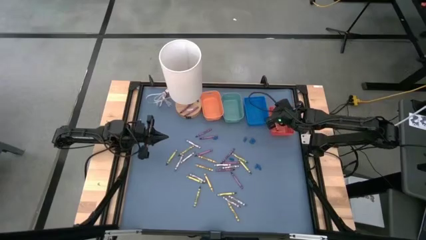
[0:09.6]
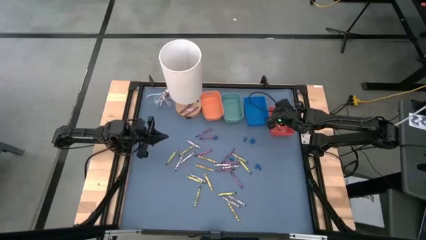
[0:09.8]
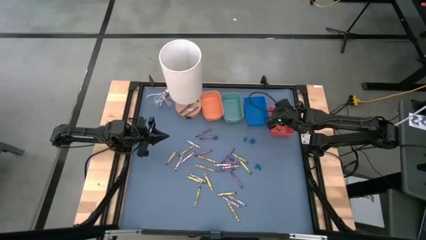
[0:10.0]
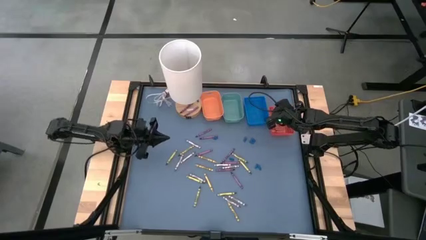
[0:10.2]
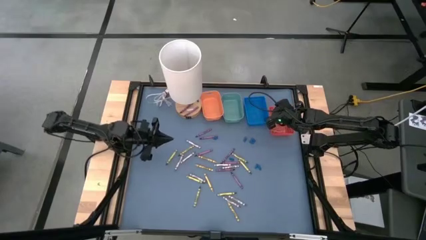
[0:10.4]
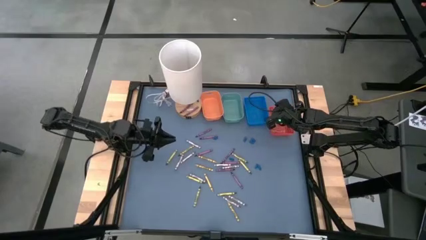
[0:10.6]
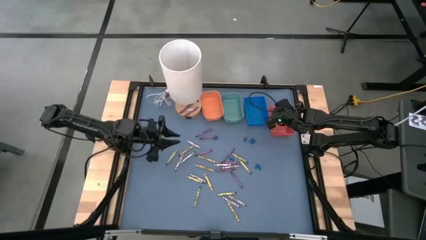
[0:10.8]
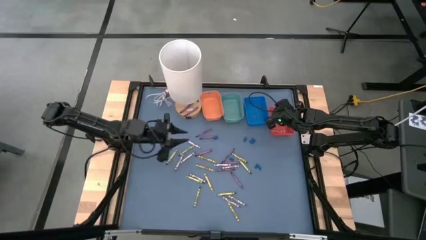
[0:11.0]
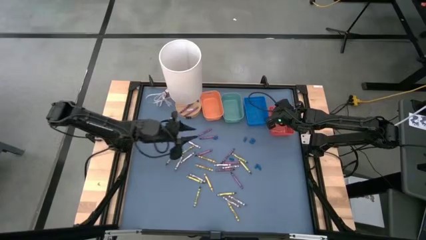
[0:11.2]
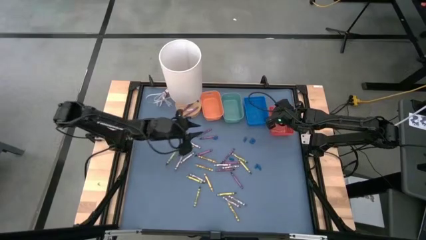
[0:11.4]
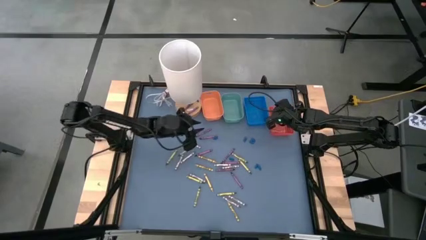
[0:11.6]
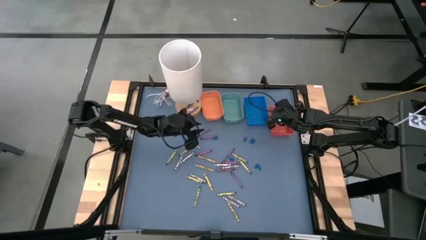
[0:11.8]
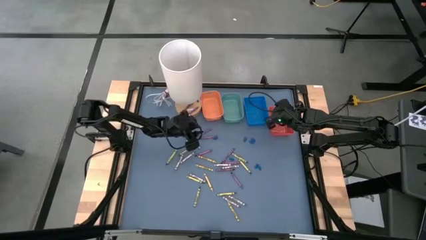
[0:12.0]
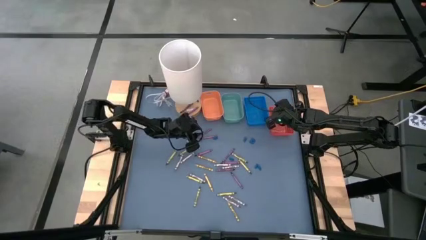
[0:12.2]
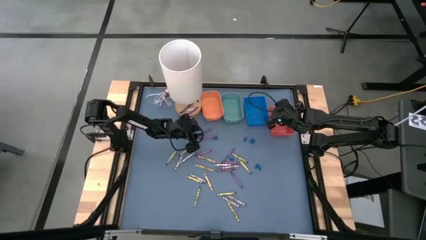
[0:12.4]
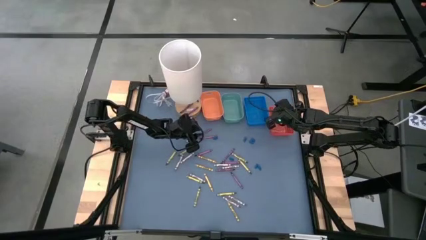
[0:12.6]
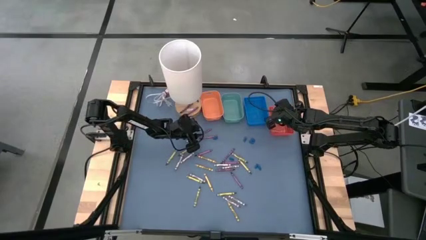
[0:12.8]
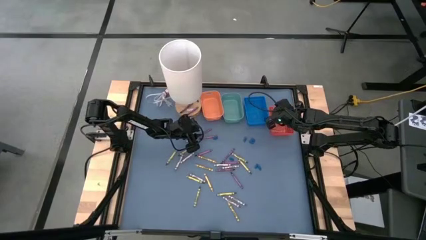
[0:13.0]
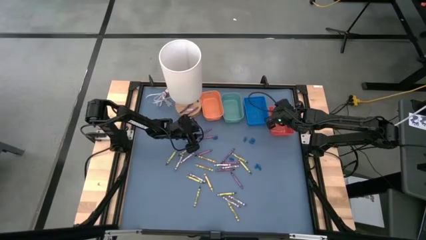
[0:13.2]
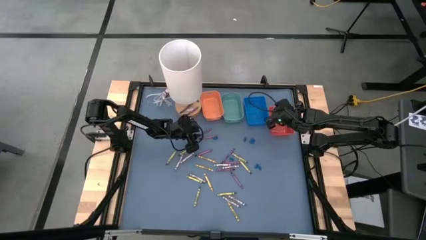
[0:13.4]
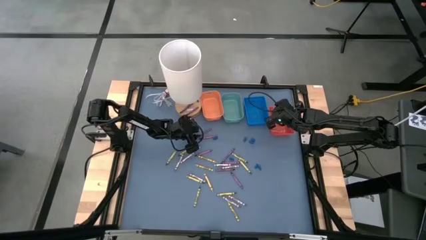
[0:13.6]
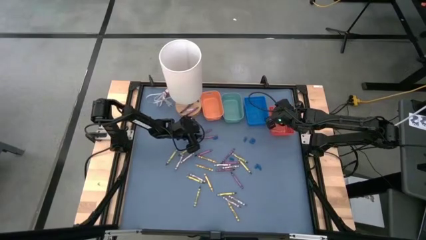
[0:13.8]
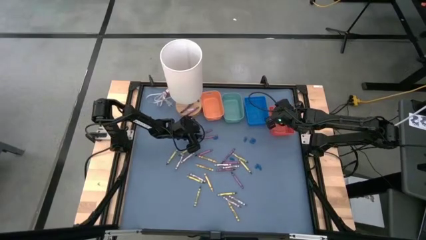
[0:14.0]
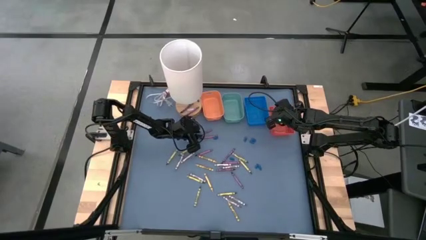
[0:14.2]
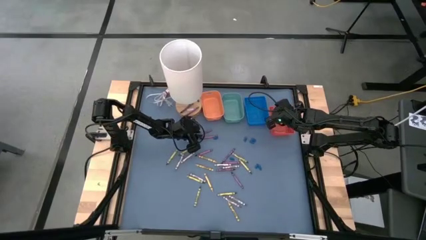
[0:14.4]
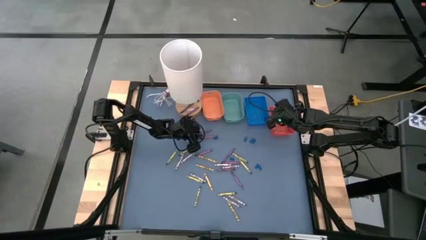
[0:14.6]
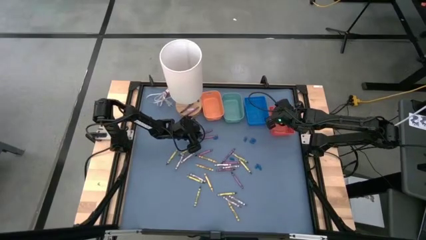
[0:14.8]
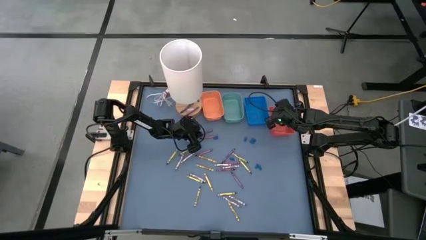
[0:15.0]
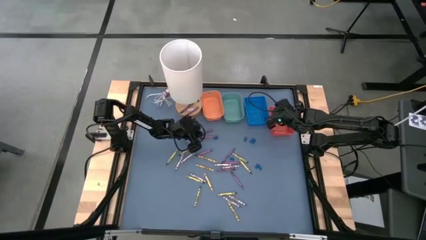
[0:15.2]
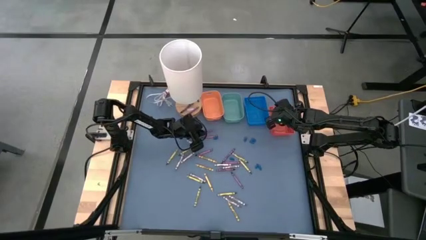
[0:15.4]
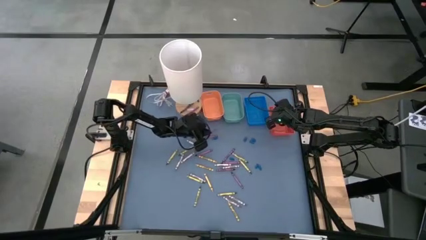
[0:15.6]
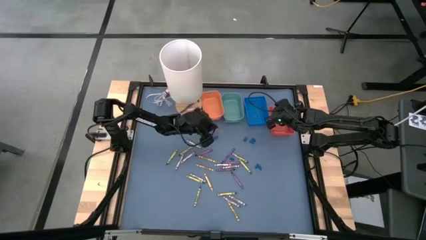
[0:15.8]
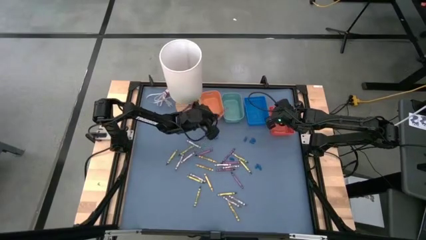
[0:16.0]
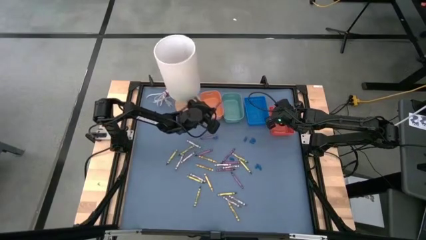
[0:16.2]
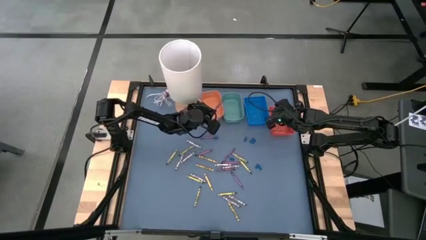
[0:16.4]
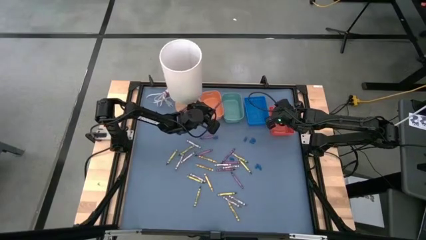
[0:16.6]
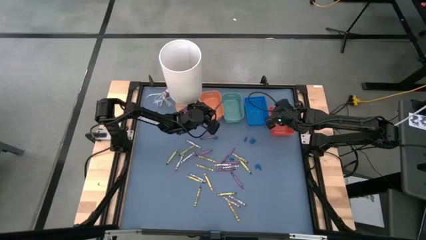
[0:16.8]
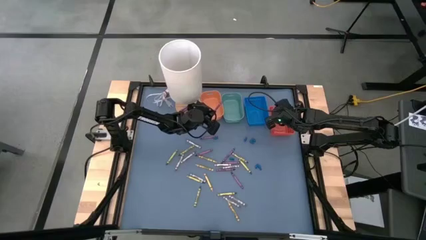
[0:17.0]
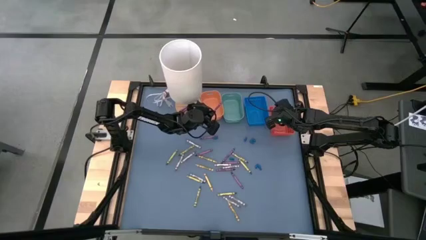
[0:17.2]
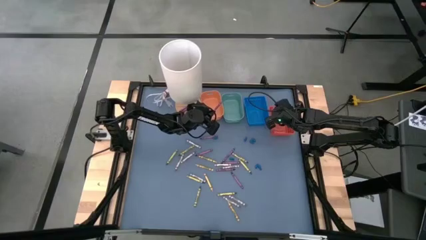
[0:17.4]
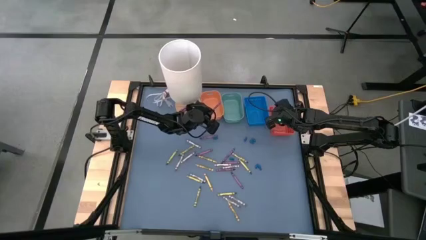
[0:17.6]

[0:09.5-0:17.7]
Task: Sort crayons
Put the purple crayon into the light orange bin

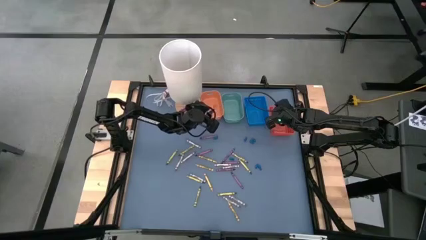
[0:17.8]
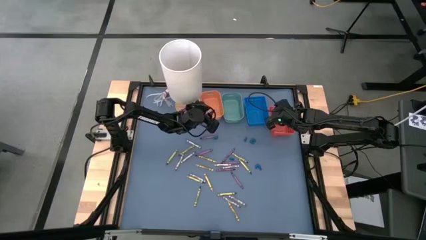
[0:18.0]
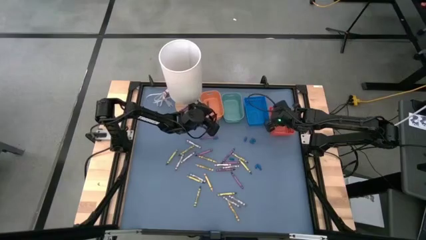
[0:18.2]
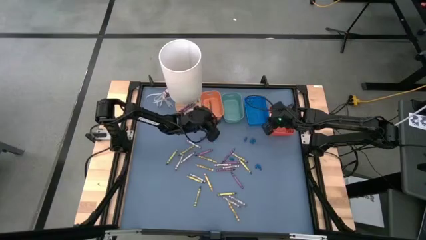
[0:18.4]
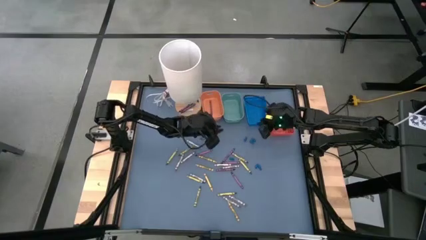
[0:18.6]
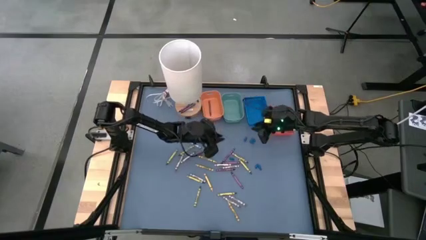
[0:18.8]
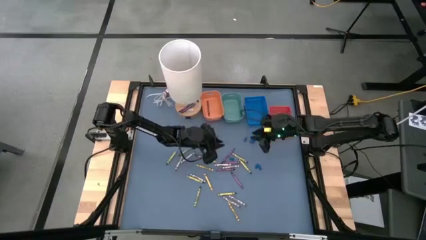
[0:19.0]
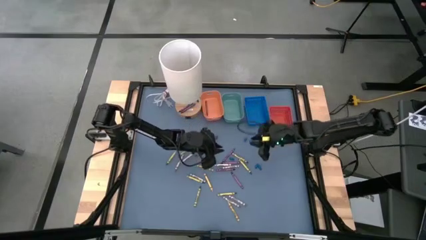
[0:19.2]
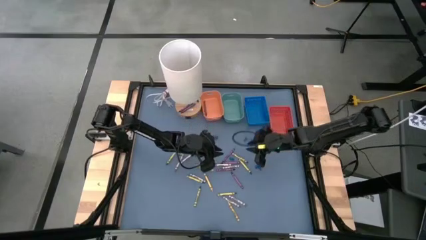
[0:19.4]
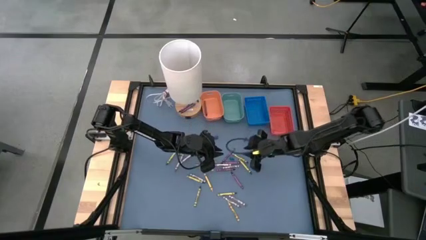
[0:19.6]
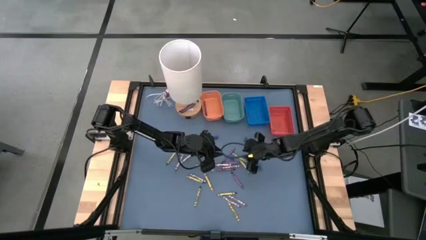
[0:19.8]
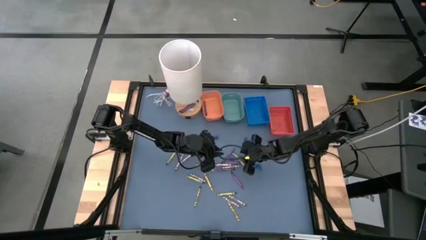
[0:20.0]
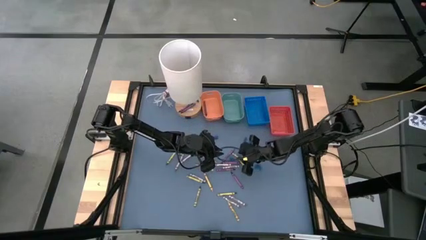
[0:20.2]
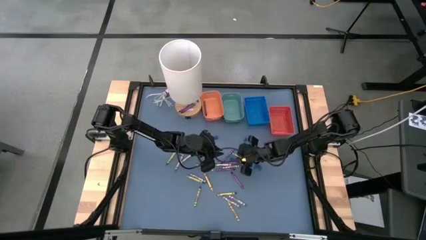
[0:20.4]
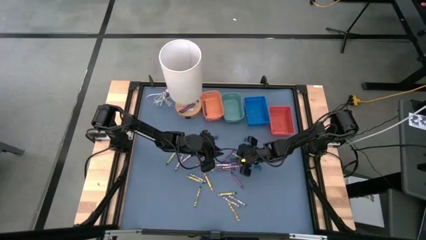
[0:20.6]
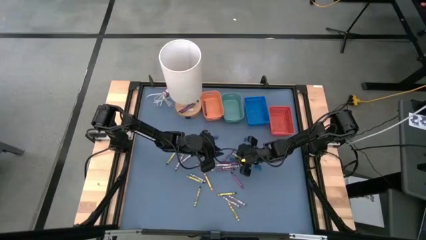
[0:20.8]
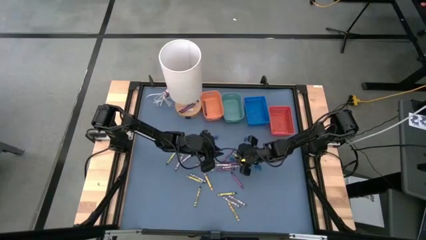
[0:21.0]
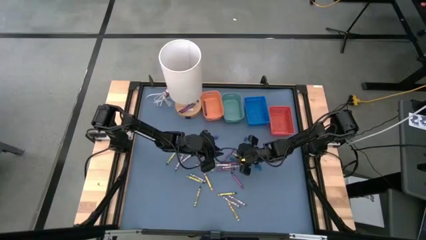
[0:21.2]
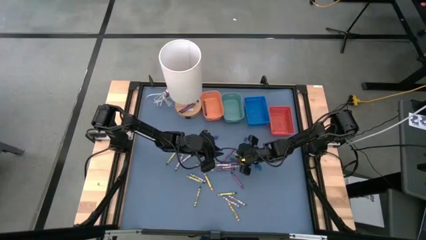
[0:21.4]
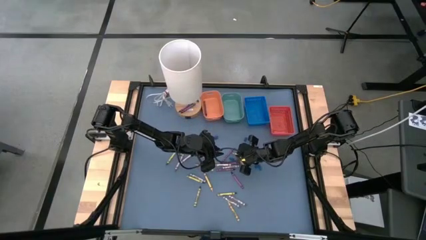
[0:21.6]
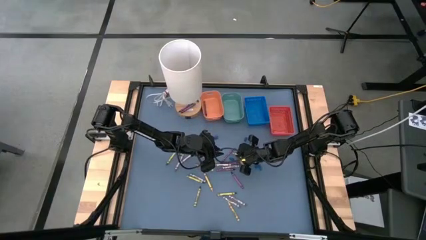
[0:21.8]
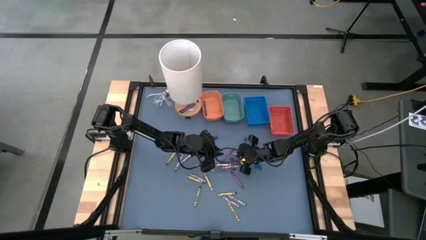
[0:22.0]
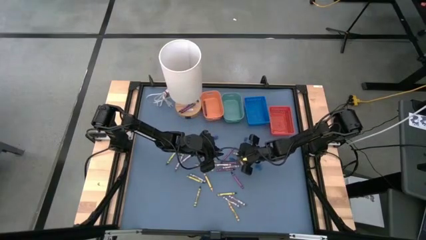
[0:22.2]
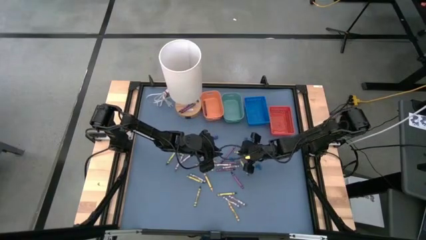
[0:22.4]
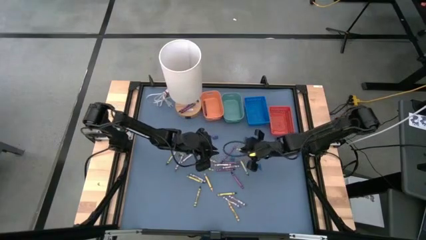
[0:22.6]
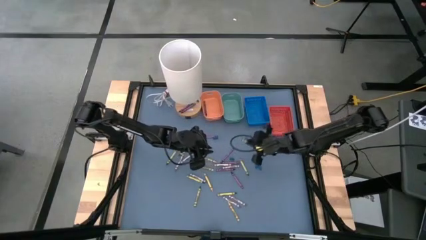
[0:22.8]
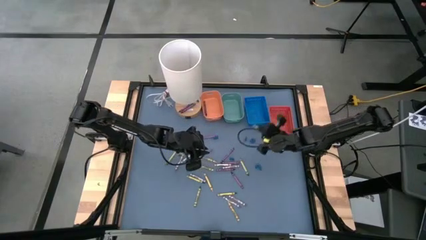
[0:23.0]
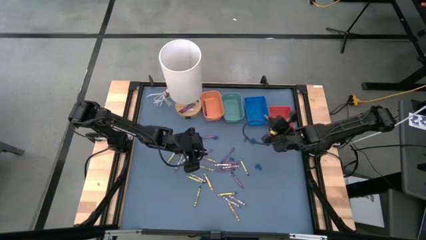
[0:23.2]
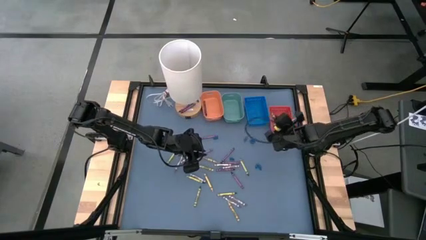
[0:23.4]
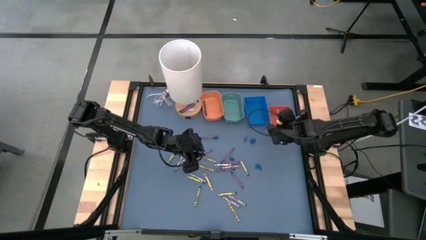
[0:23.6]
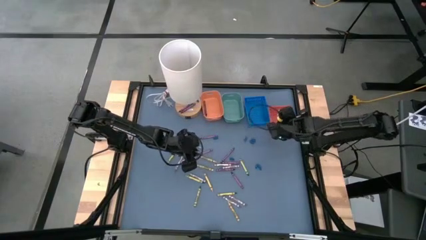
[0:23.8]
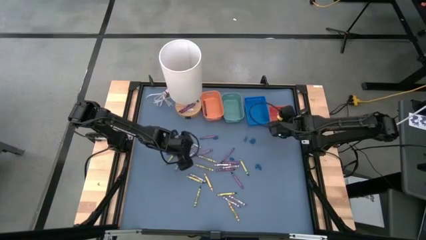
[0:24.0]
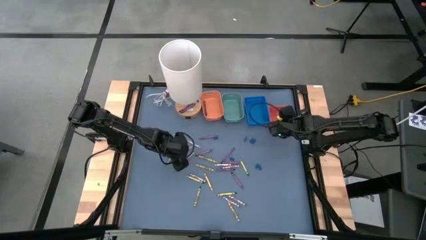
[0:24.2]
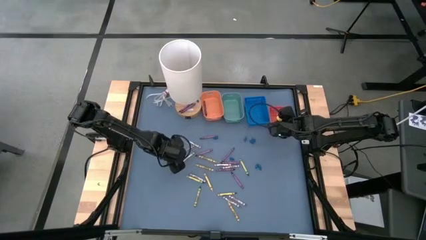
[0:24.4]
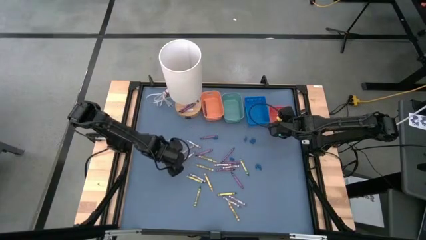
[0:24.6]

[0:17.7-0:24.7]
Put the green crayon into the orange bin

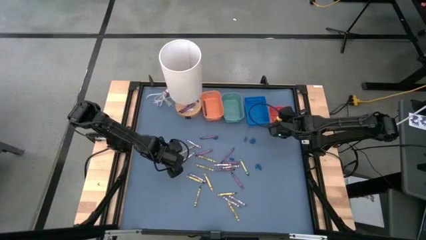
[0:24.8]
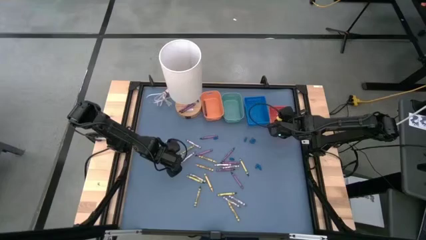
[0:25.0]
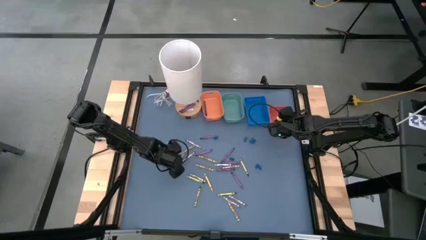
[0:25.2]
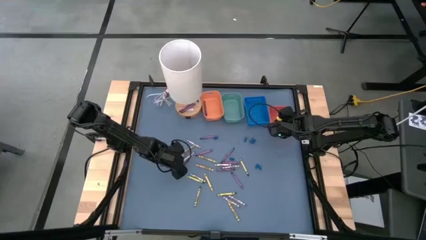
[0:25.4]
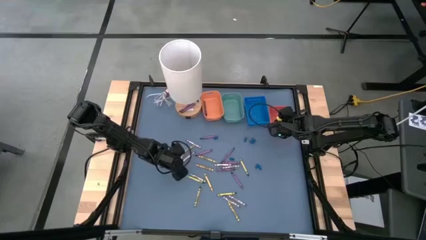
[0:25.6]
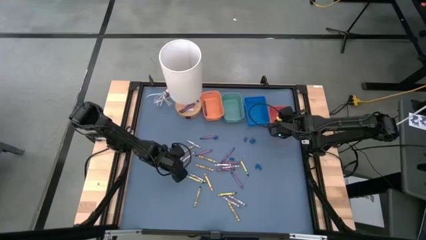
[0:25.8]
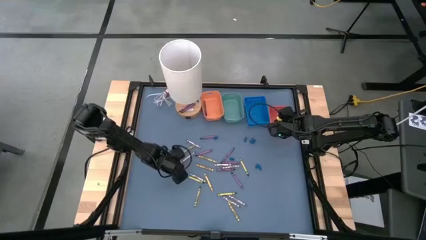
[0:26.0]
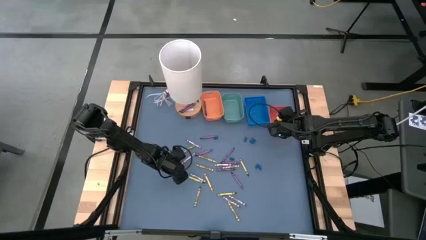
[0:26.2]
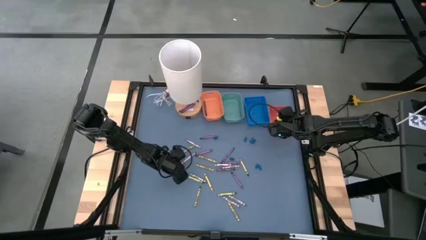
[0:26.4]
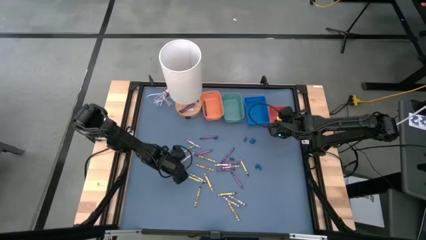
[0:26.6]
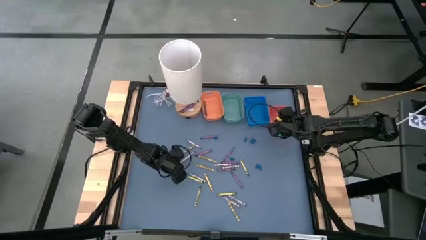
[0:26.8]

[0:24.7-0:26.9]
Put the gray crayon into the green bin
